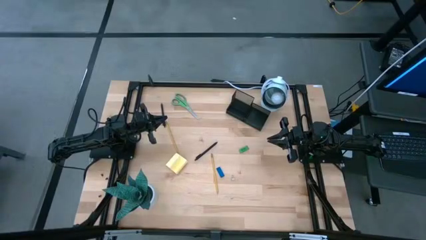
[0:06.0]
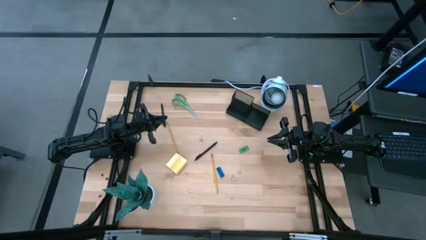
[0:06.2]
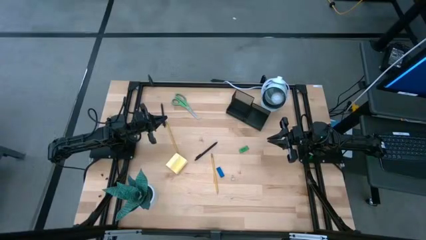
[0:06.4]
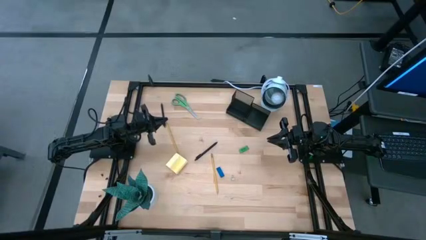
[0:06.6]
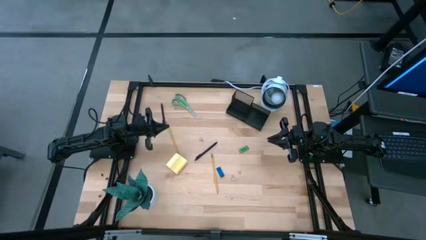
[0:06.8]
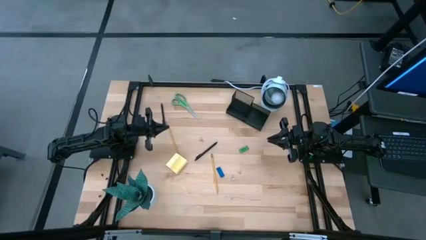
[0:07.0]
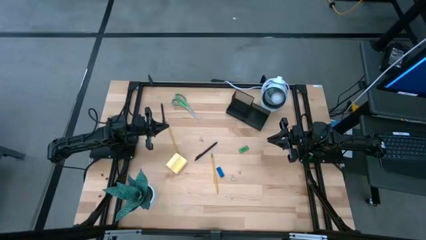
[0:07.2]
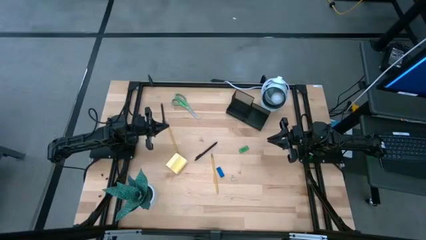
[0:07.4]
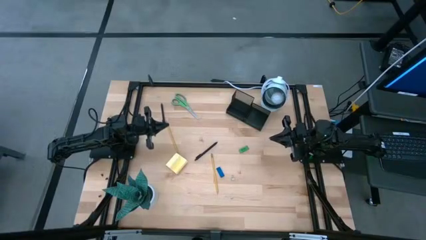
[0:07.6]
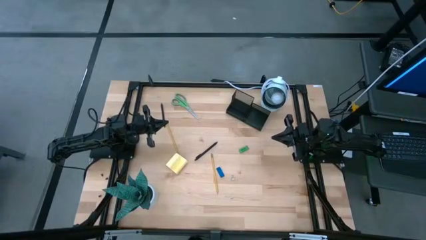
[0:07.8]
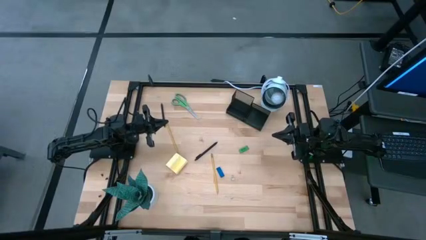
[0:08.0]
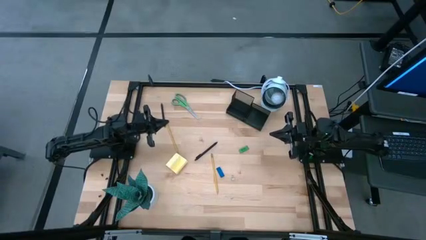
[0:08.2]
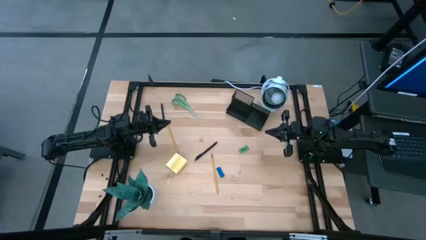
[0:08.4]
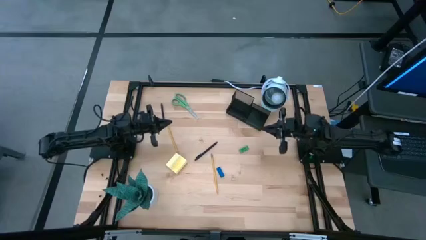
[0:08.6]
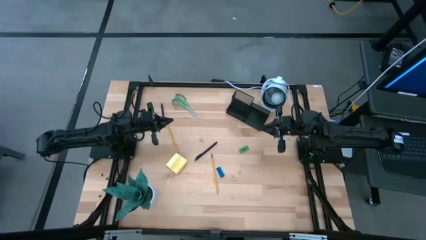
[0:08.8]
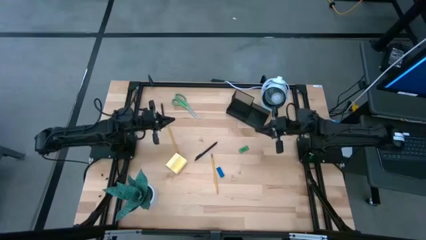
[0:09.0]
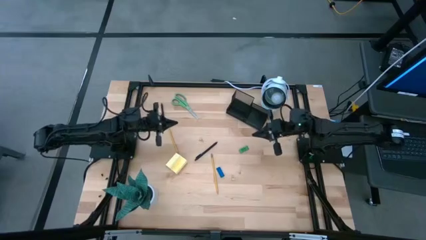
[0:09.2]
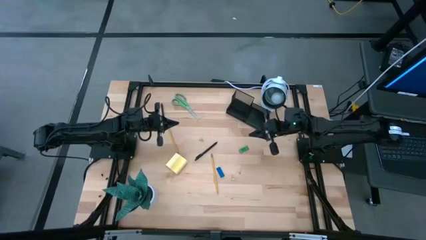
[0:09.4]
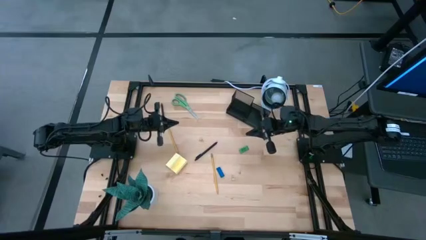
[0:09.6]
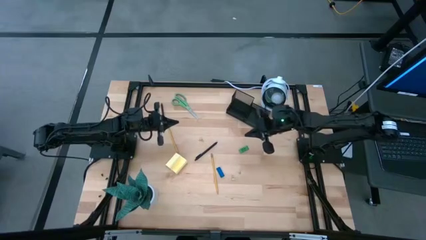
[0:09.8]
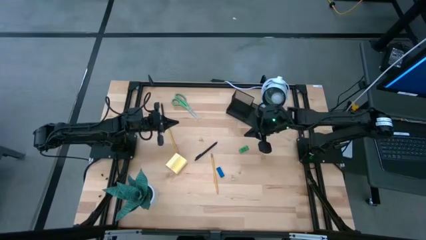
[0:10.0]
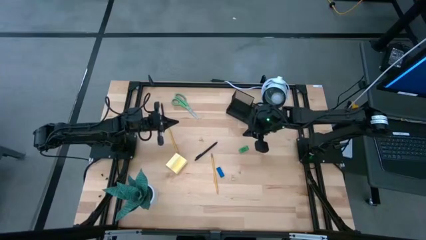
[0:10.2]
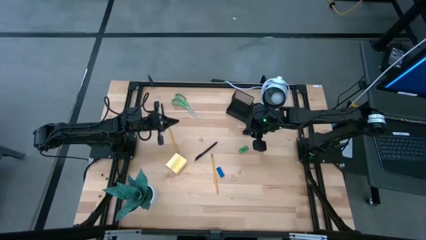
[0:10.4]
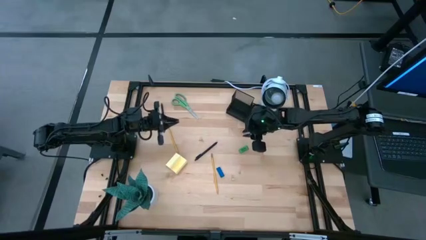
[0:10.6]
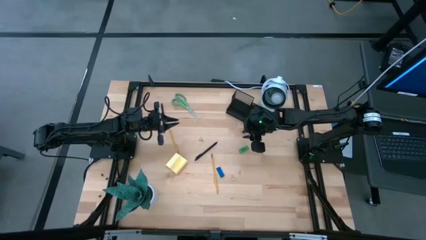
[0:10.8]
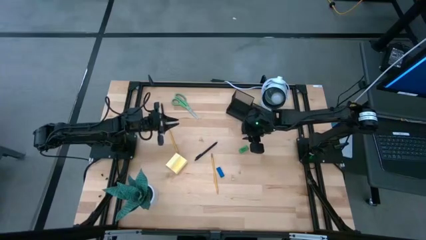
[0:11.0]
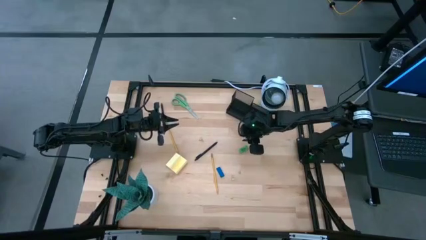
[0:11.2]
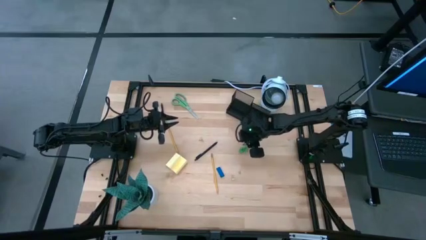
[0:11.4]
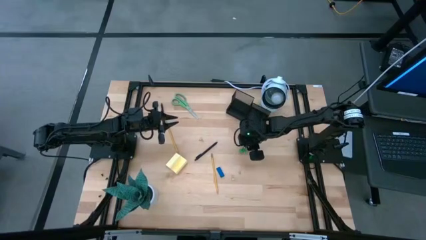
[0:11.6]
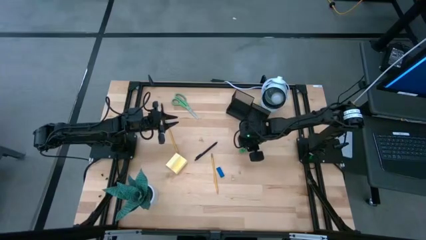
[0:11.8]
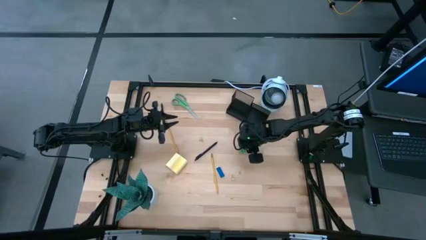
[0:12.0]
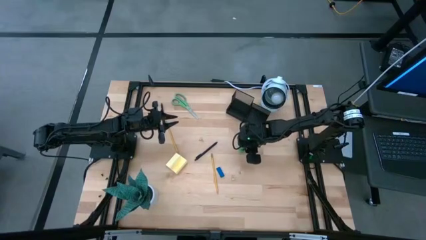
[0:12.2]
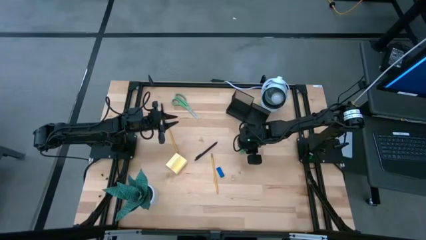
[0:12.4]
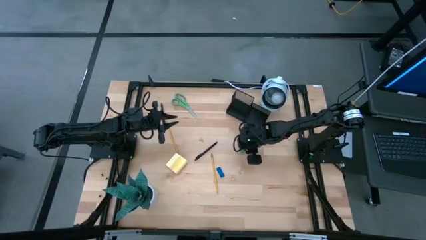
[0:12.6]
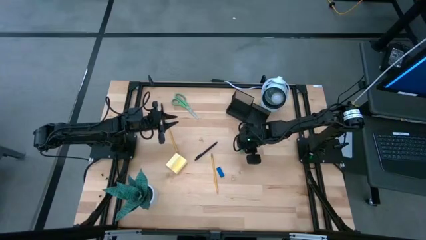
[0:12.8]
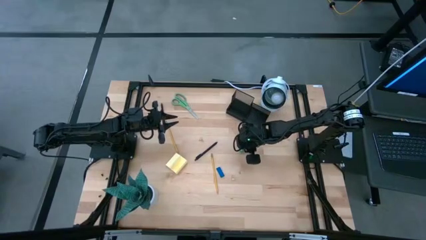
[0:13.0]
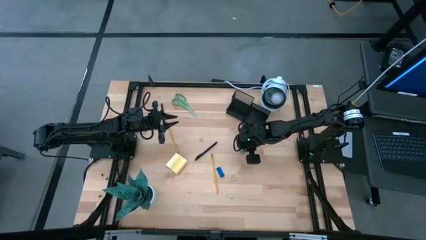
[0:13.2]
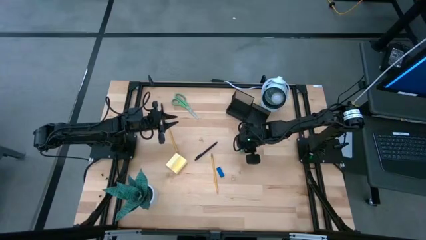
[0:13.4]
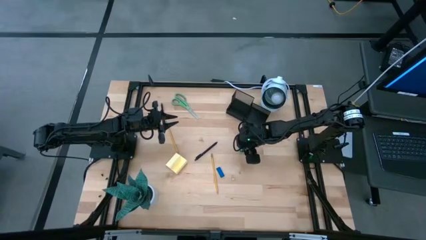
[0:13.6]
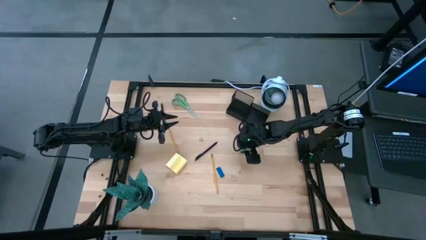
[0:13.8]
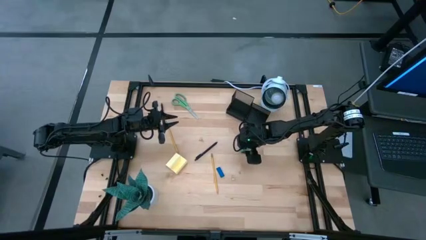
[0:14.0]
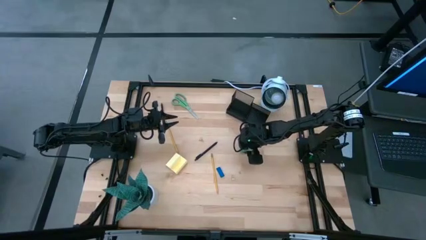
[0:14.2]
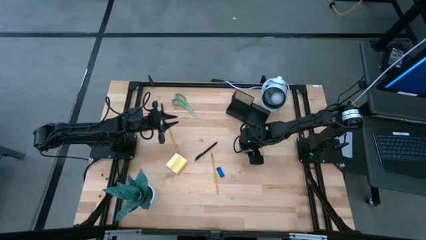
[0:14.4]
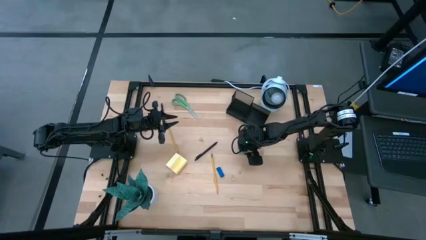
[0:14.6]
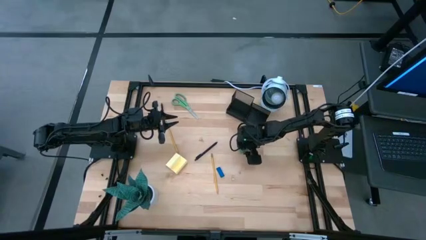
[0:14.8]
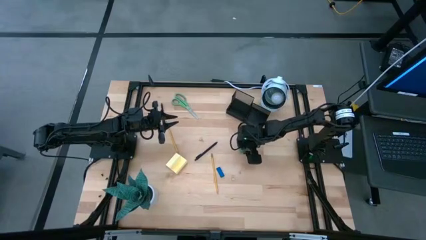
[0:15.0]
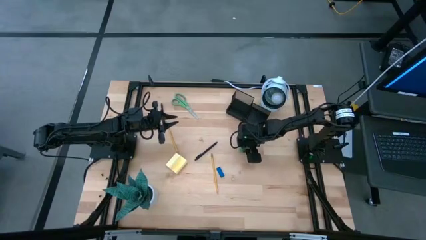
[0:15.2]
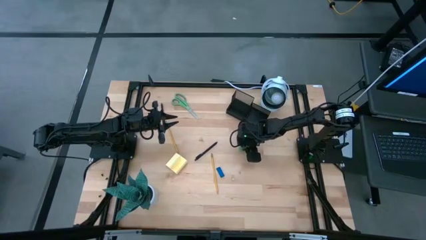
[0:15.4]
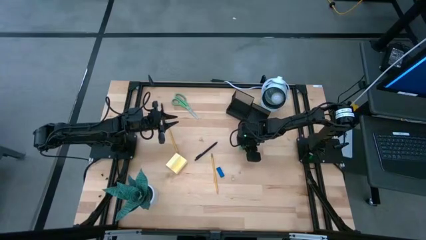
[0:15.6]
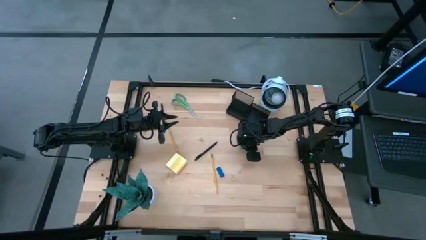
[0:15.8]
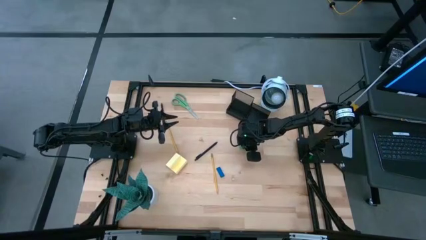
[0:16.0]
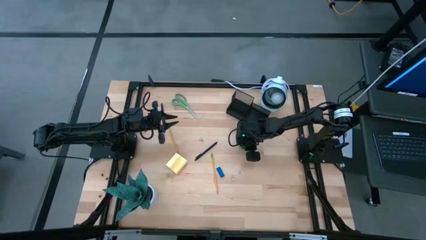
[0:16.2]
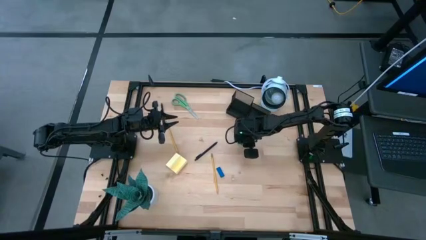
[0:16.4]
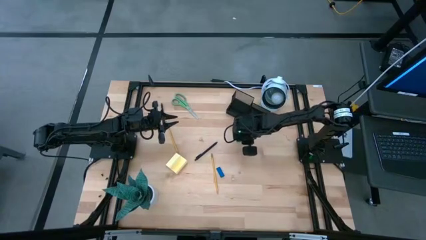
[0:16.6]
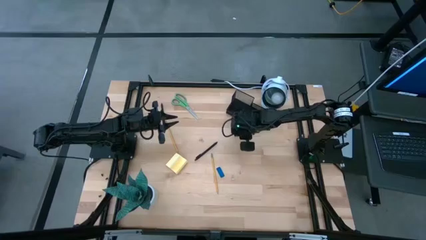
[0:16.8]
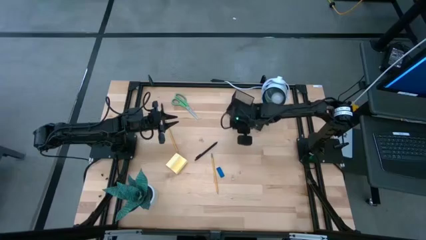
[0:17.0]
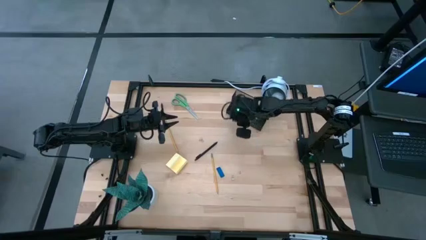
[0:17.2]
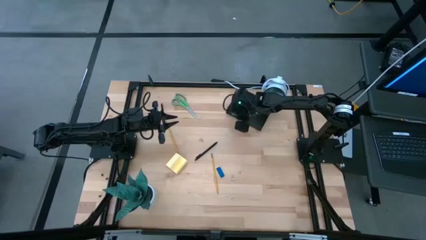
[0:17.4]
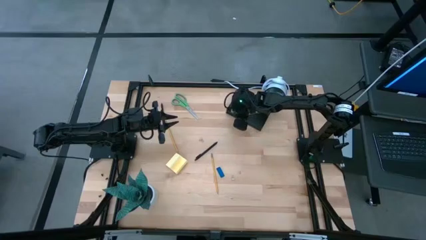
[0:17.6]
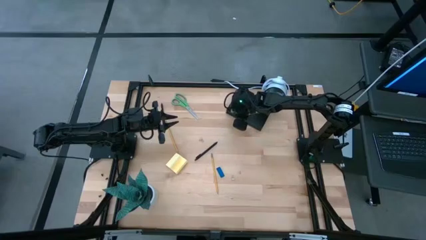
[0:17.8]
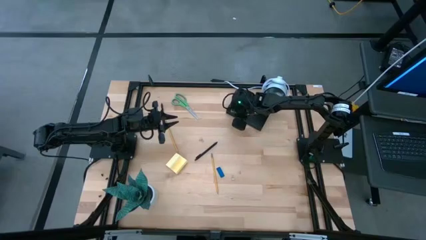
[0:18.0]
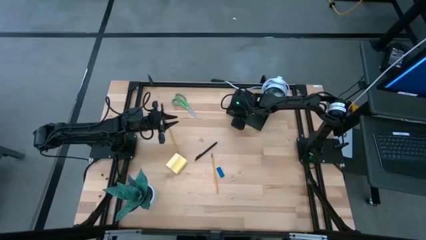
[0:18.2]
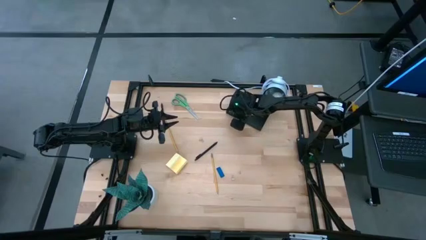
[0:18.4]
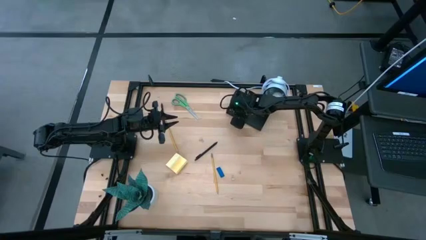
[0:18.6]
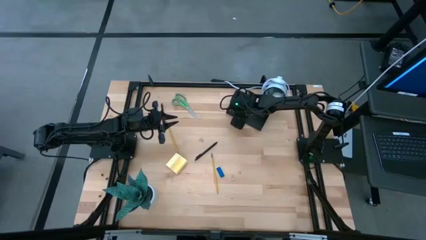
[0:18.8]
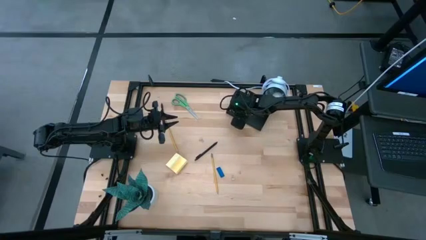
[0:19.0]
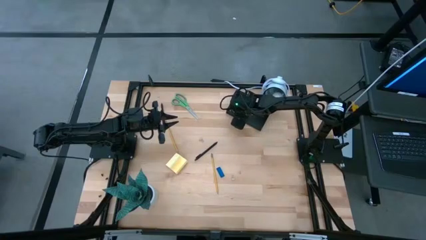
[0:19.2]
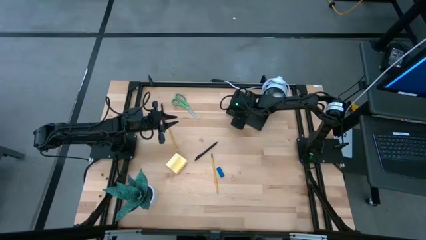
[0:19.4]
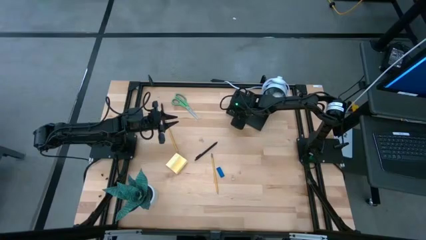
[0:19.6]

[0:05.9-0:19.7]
Task: Pick and place office supplies into organizer
Put the green eraser into the metal mesh desk organizer
